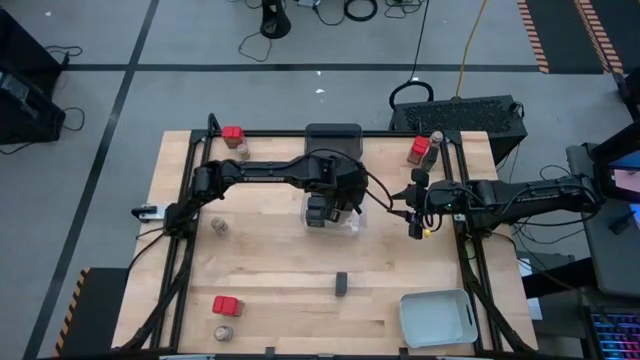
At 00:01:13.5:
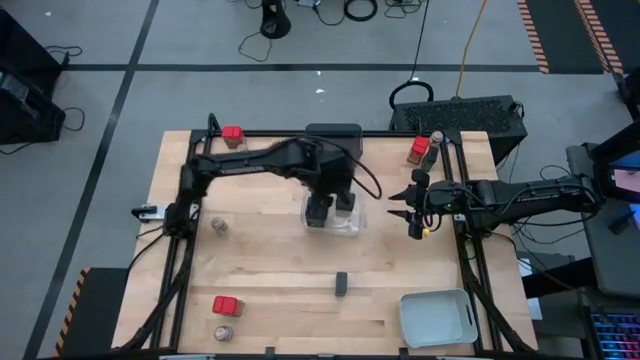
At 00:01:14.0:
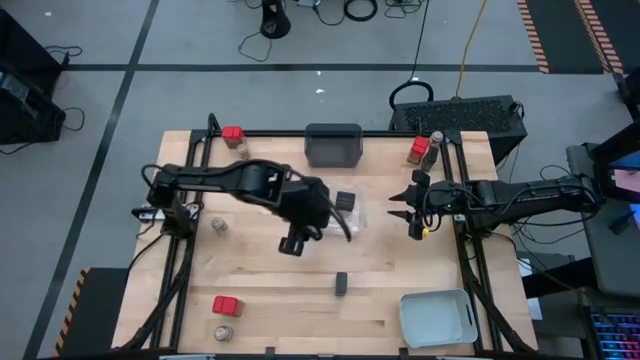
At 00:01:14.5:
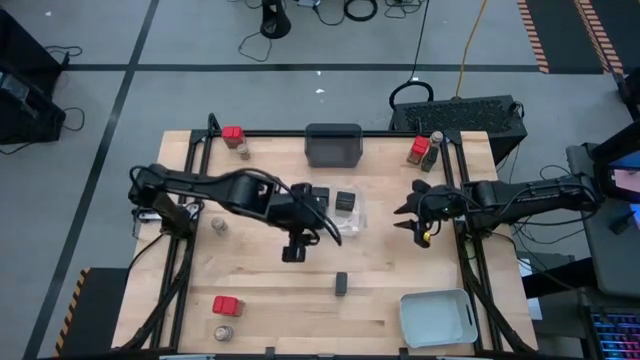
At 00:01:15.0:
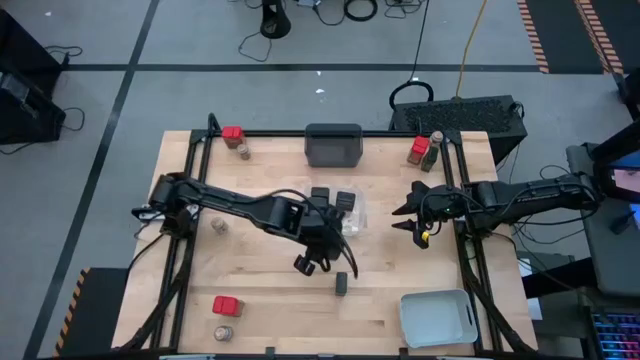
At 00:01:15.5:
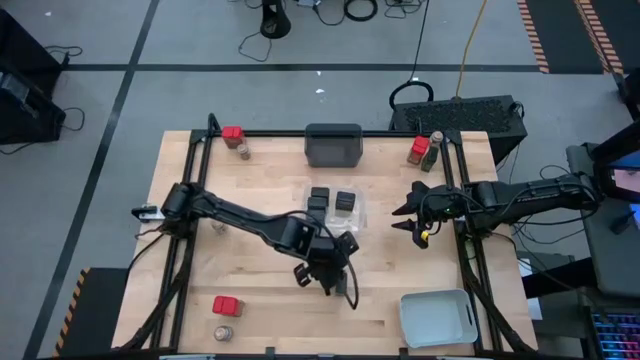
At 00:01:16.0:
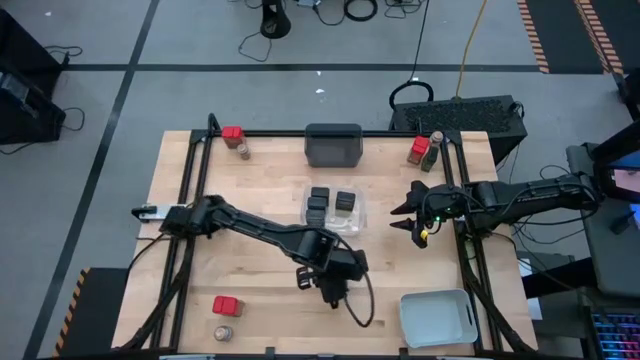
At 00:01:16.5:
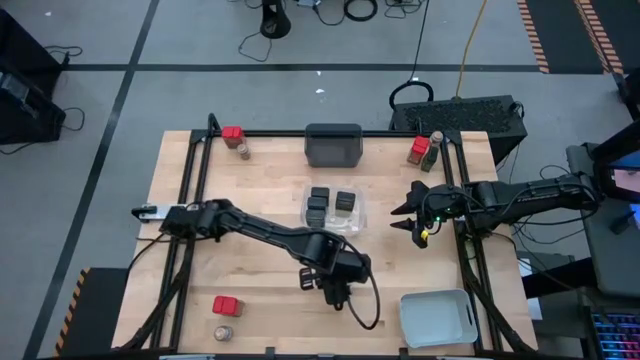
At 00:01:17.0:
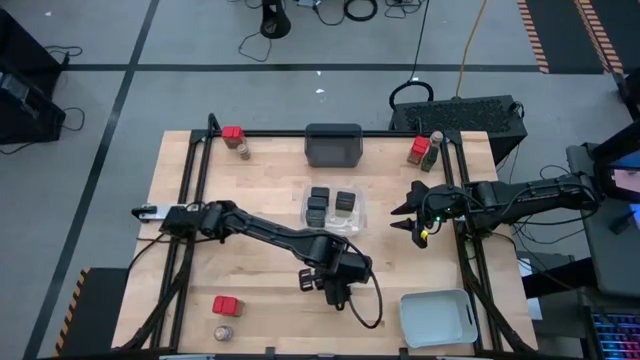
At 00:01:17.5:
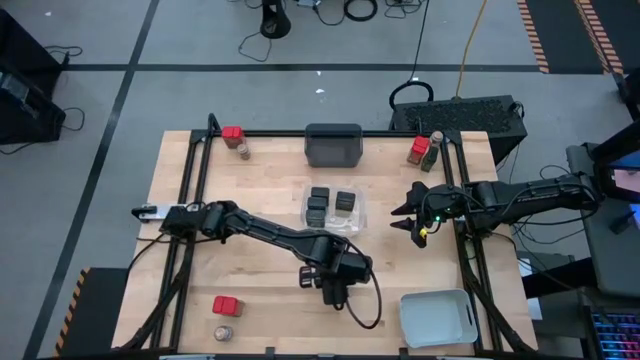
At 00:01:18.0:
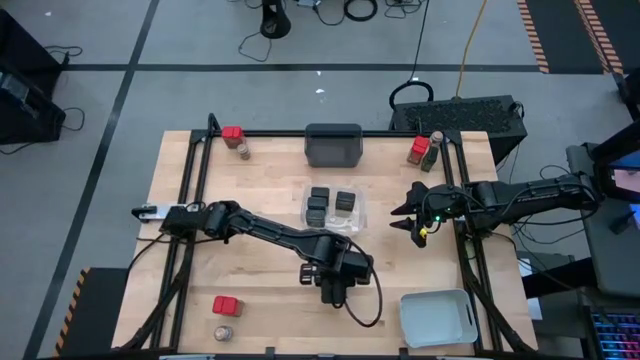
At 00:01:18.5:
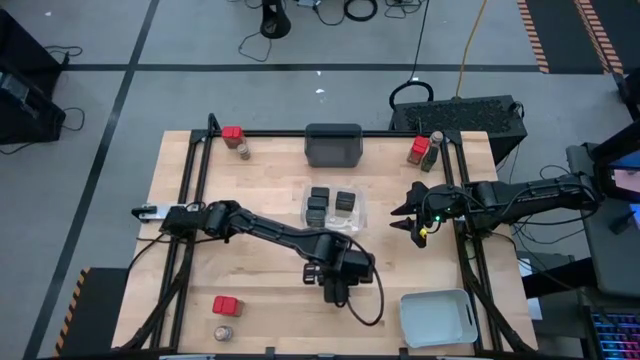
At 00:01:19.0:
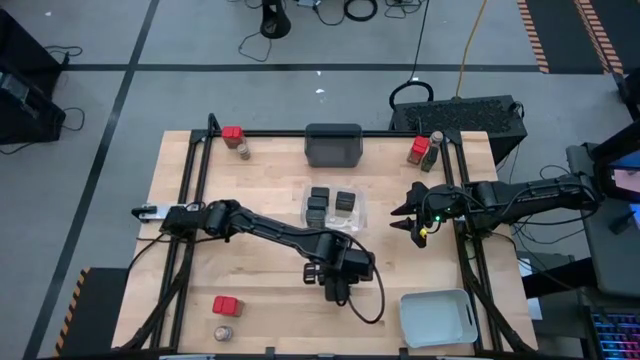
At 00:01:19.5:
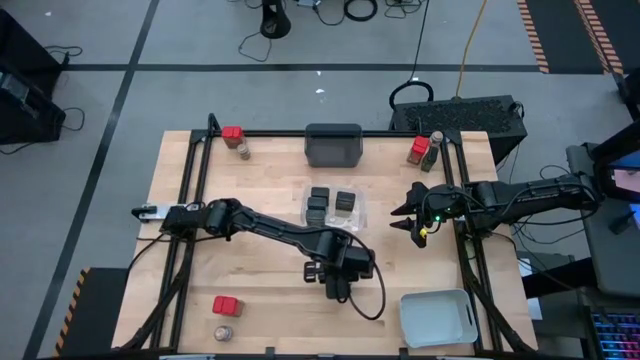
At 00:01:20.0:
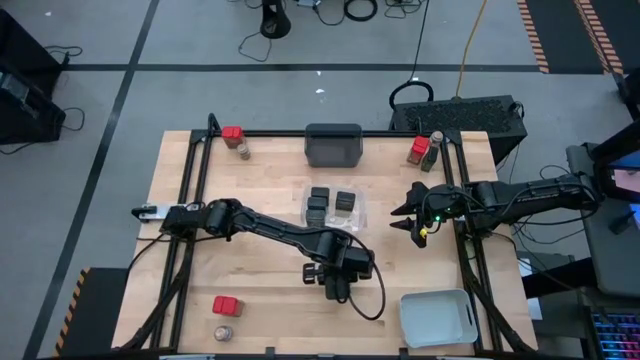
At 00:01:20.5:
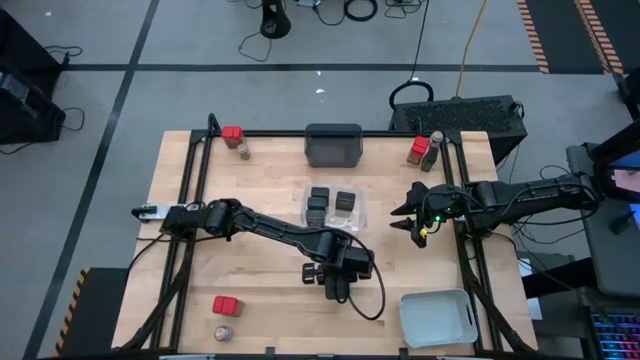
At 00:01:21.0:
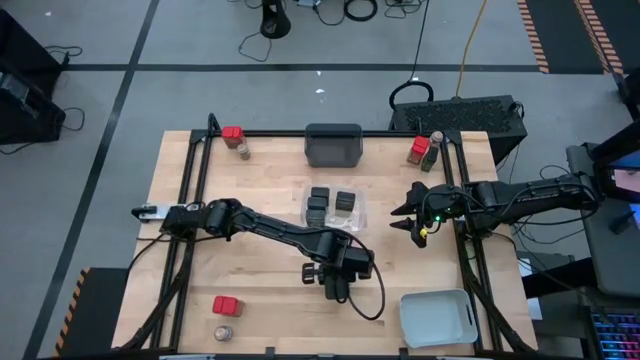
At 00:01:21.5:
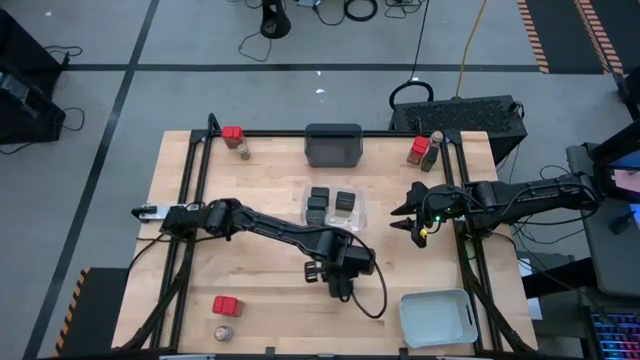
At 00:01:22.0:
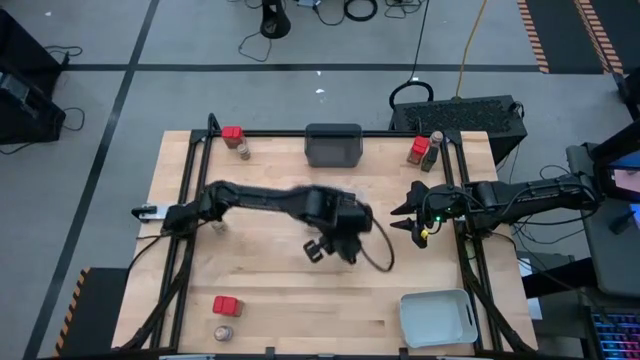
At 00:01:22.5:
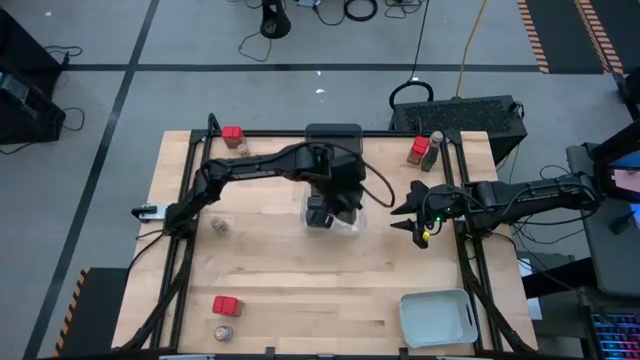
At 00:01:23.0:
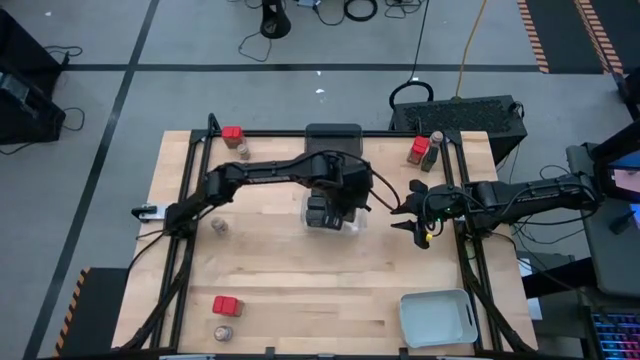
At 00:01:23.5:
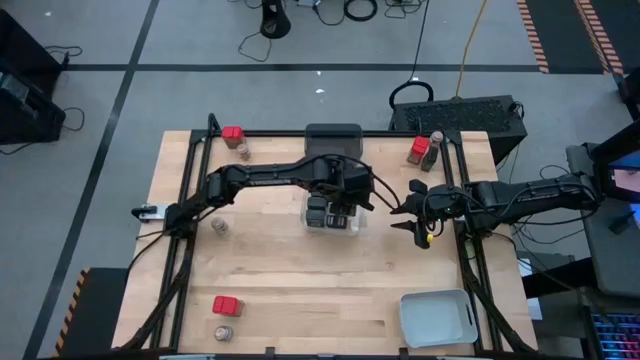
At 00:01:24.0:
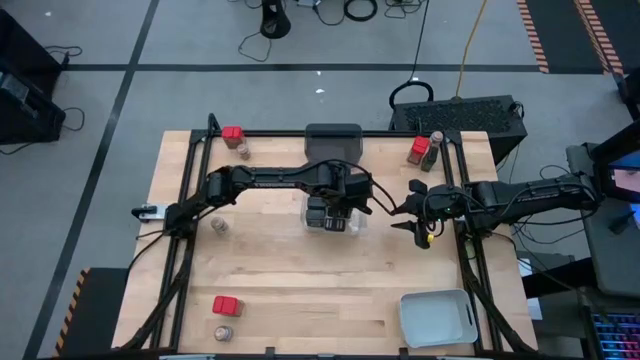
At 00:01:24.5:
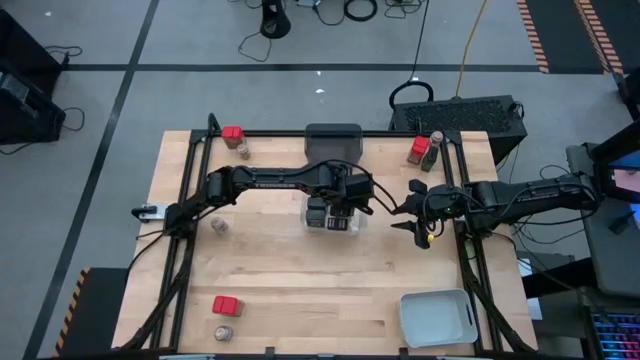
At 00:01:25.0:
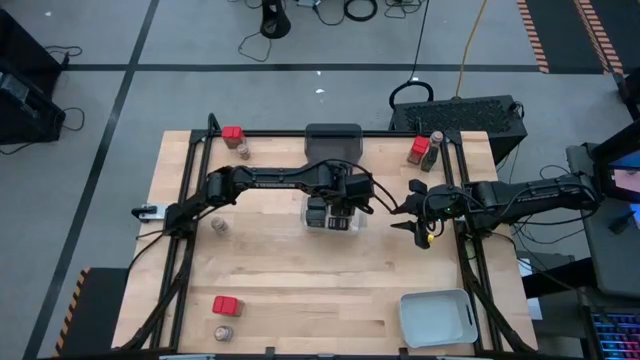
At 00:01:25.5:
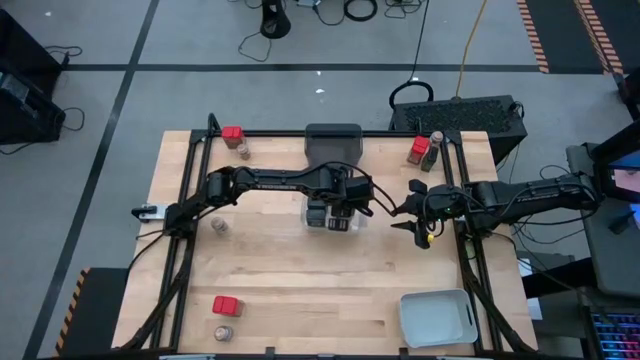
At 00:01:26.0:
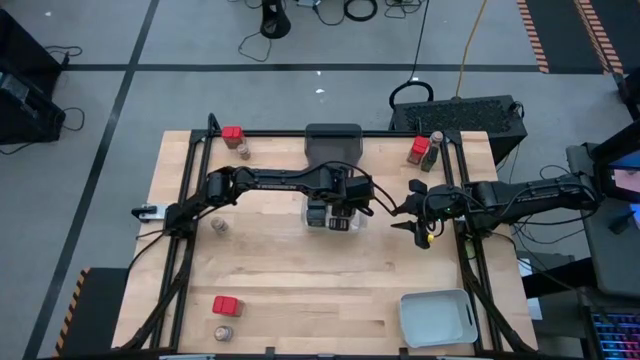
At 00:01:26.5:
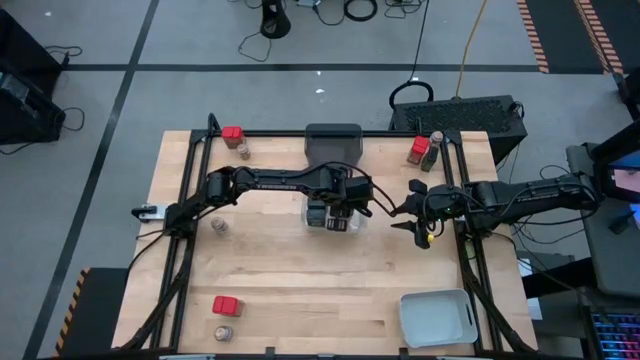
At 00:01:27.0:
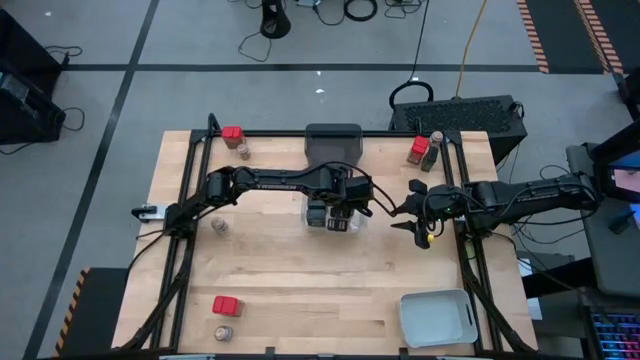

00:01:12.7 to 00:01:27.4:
Task: Sort spices by type
Put the green seasoning bottle into the transparent bin

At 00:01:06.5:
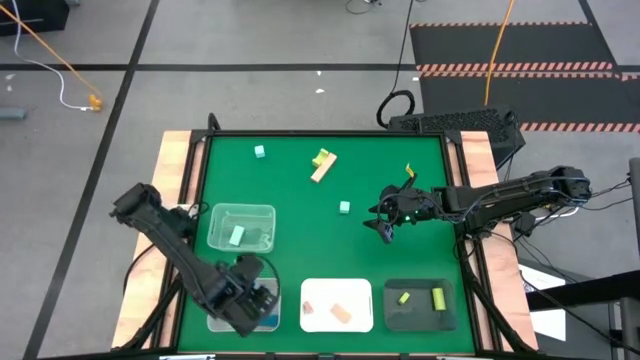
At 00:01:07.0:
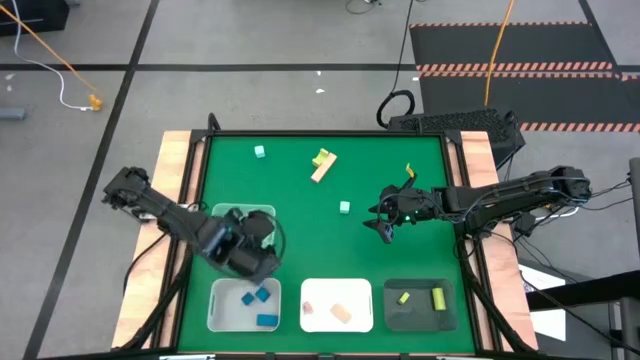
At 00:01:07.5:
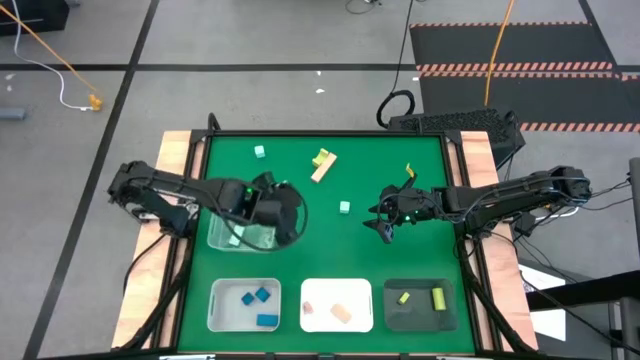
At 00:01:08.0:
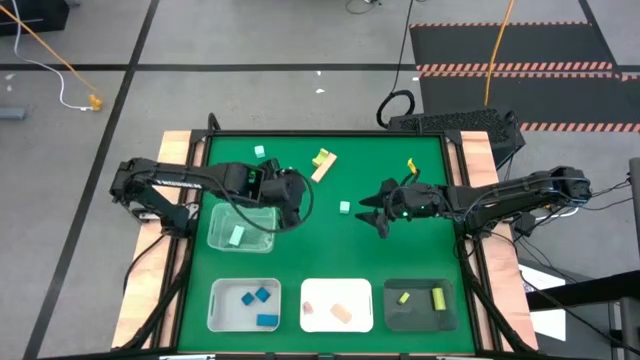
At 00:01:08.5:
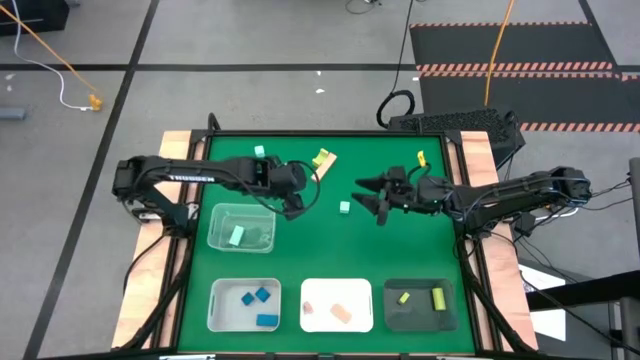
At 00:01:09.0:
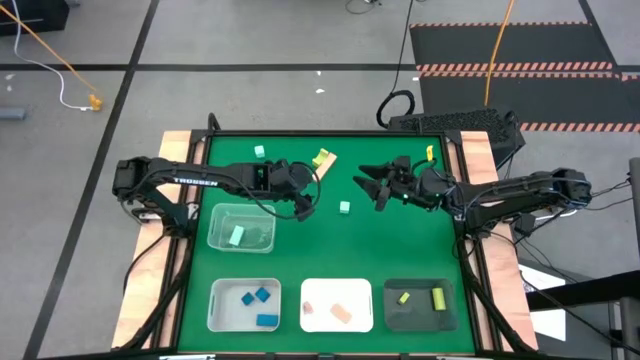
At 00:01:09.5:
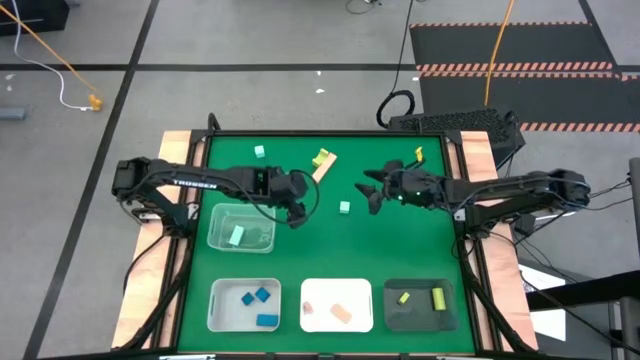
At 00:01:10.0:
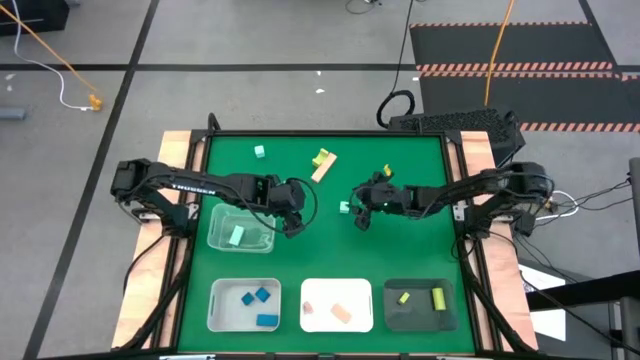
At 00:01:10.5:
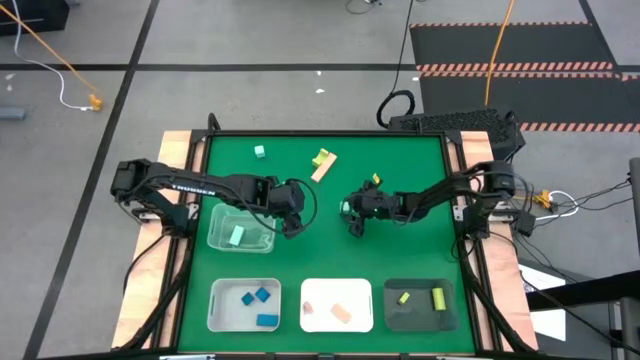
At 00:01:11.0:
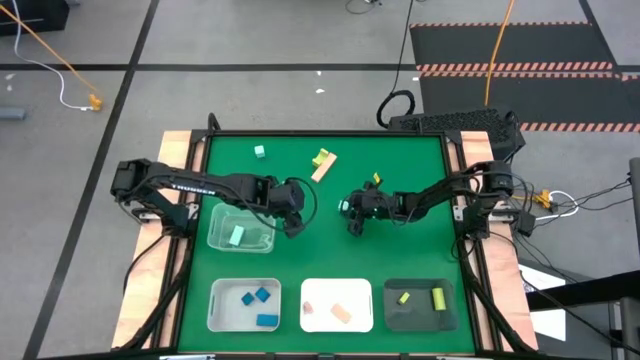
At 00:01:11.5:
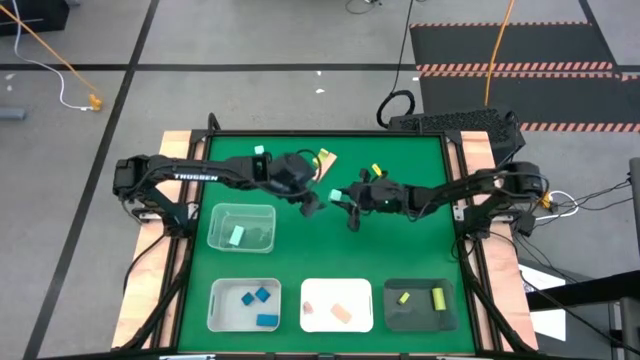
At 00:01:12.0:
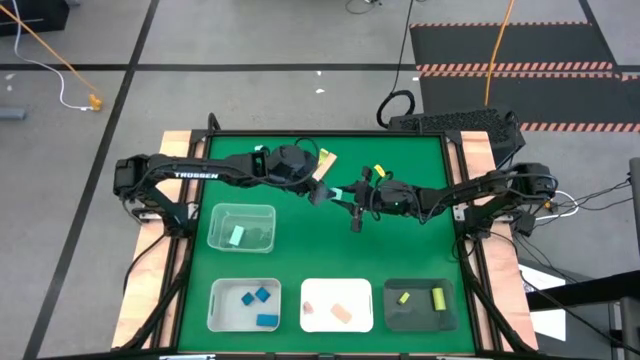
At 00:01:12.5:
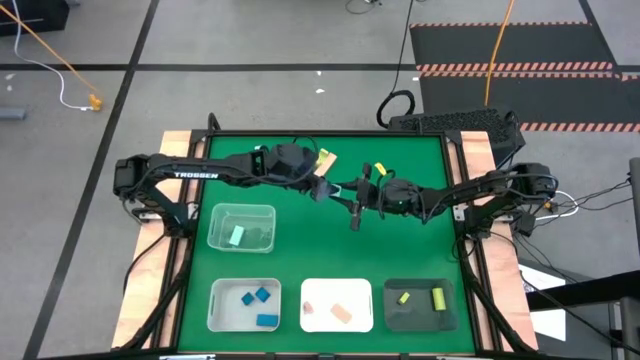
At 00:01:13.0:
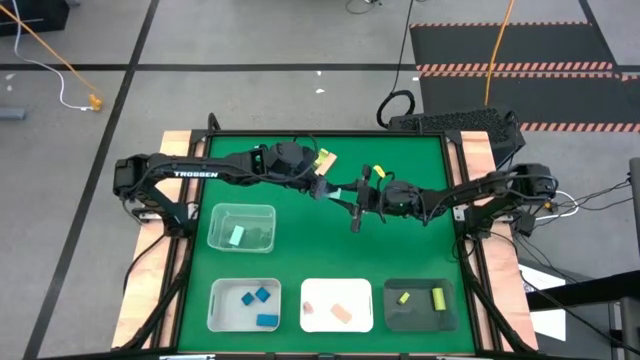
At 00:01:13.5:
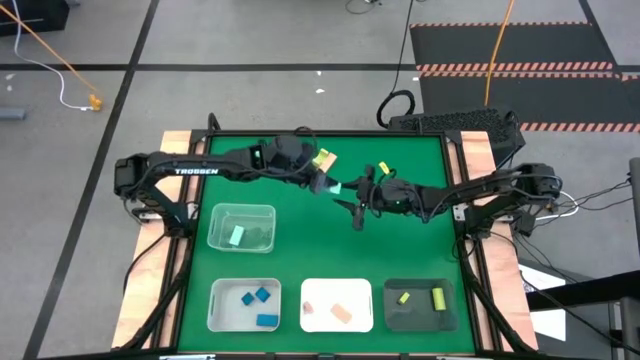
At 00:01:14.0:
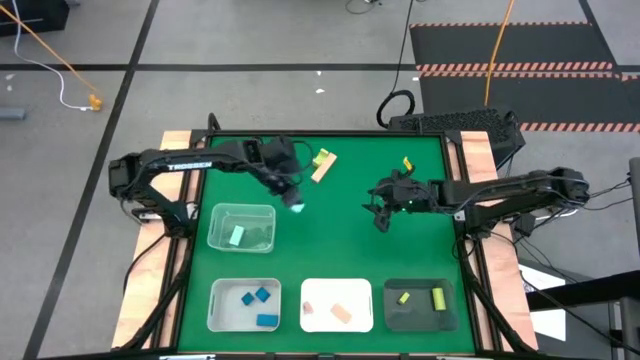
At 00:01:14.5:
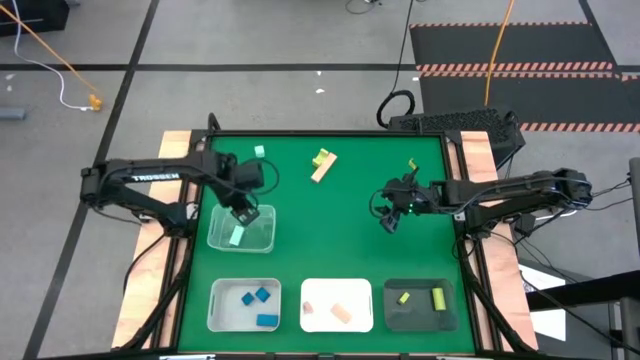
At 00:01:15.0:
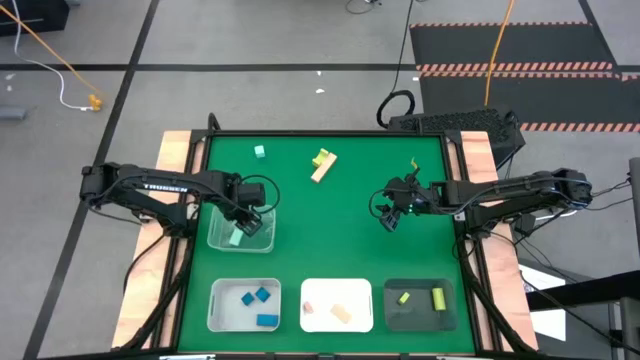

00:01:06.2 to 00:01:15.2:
Task: Sort & place blocks by color
Put the bottom light blue block into the transparent bin
